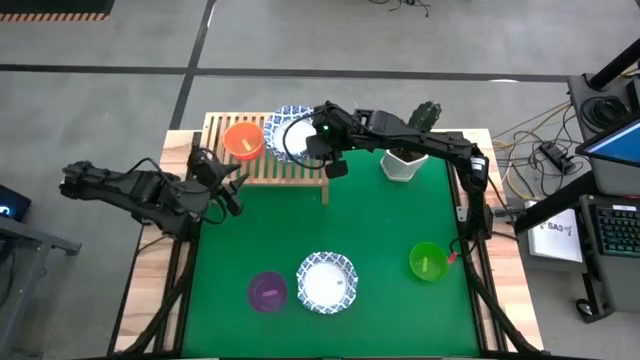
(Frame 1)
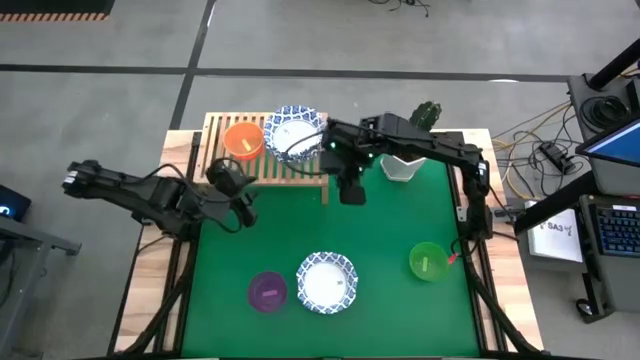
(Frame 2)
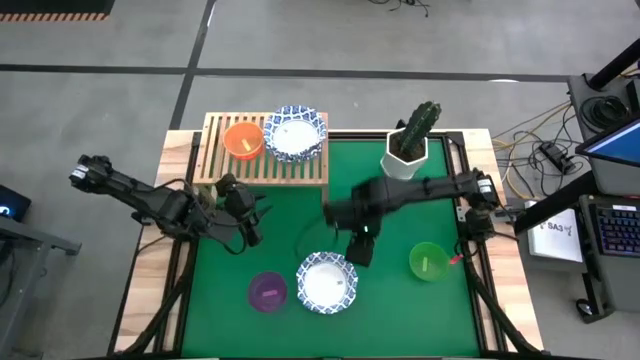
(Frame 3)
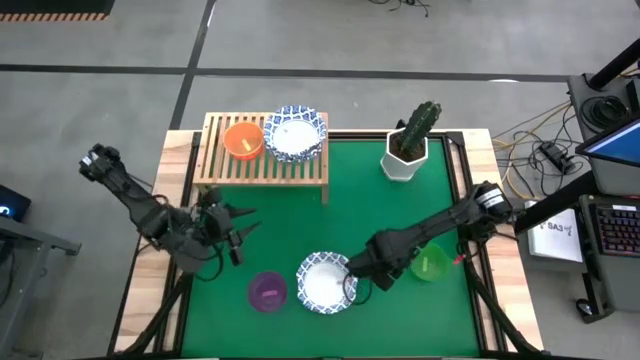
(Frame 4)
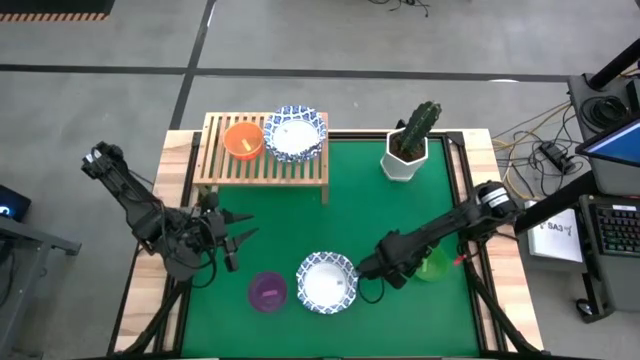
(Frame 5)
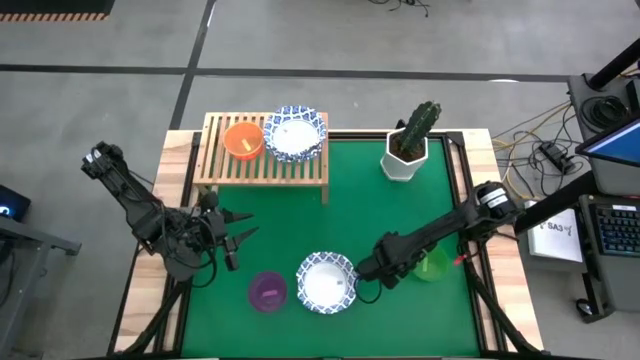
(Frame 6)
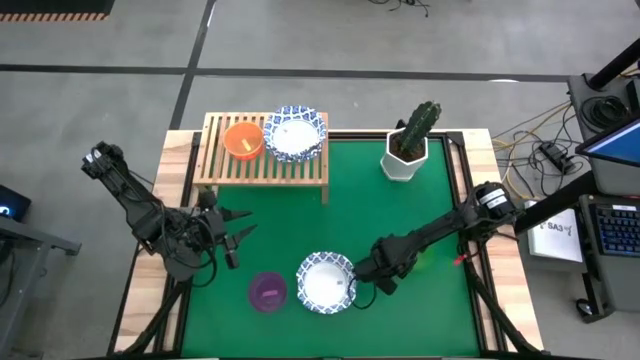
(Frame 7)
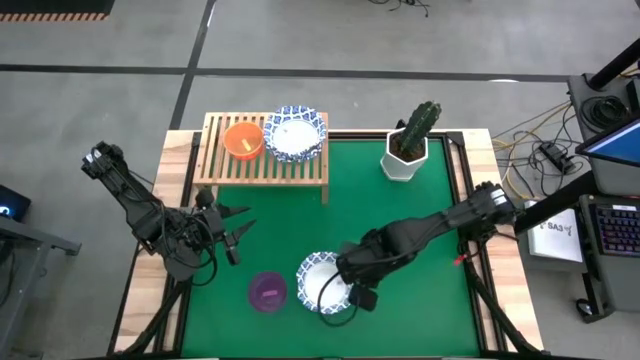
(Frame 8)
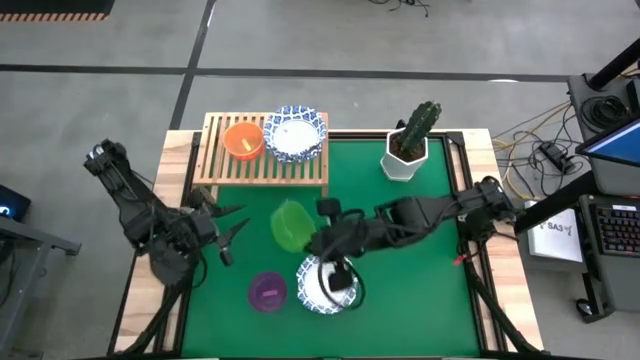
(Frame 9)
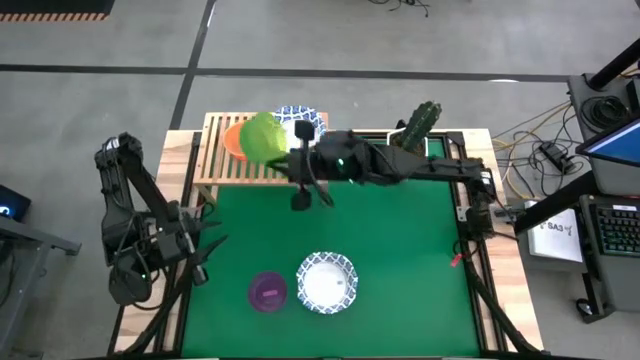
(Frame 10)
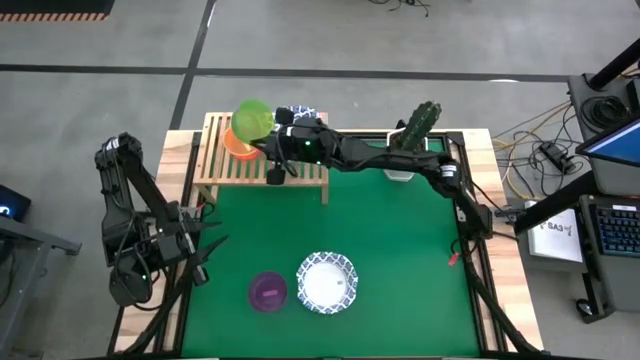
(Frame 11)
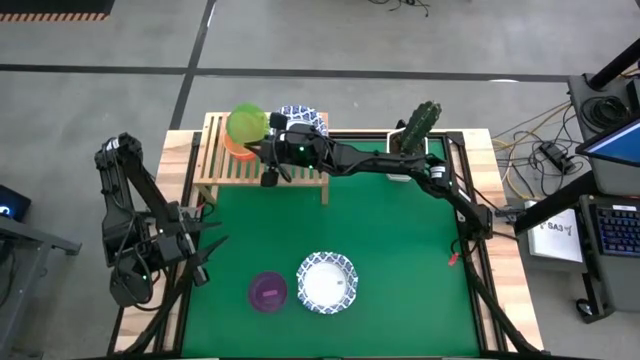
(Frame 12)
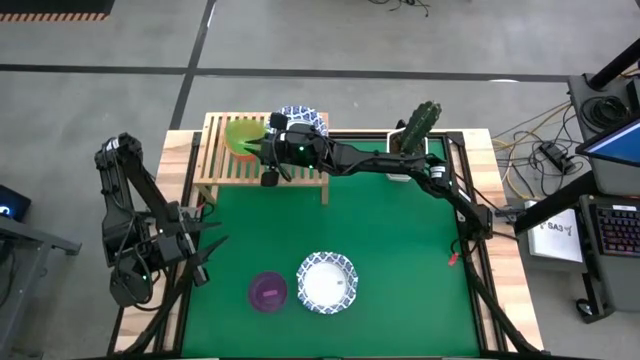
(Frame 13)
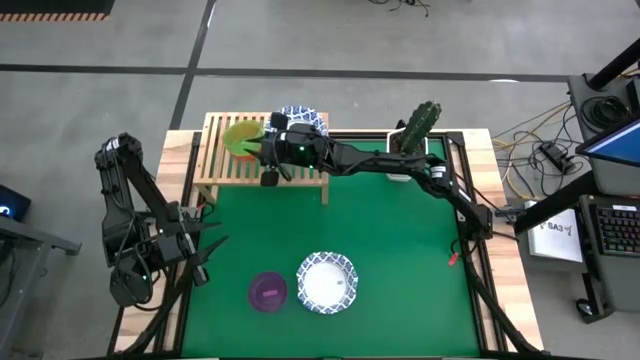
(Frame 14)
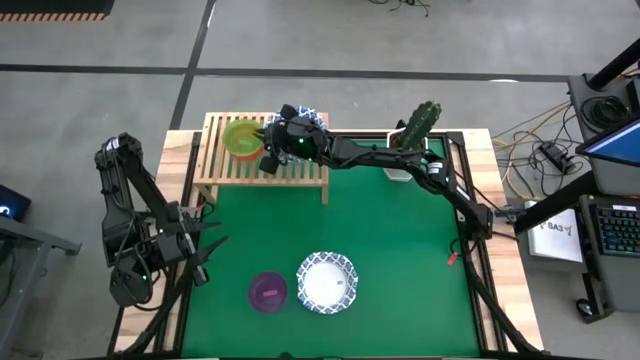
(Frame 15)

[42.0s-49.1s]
Task: Place and stack plates onto a shelf
Stack the green bowl on top of the yellow bowl on the shelf

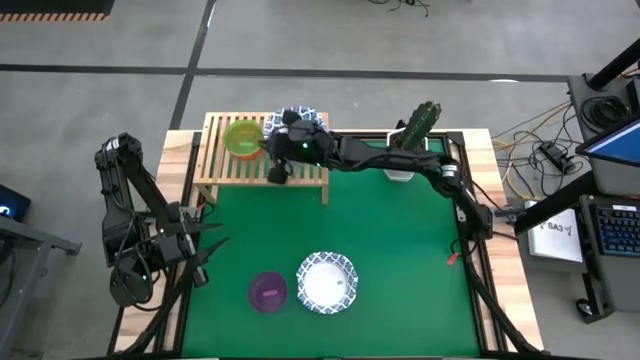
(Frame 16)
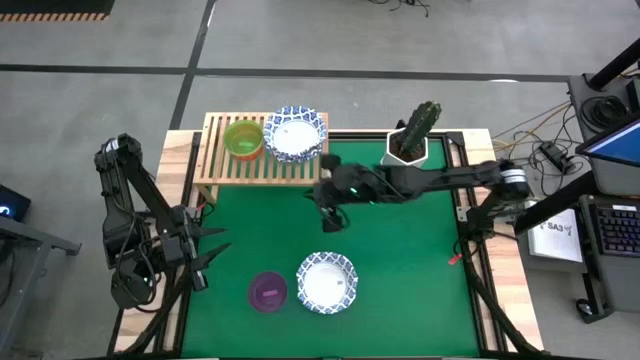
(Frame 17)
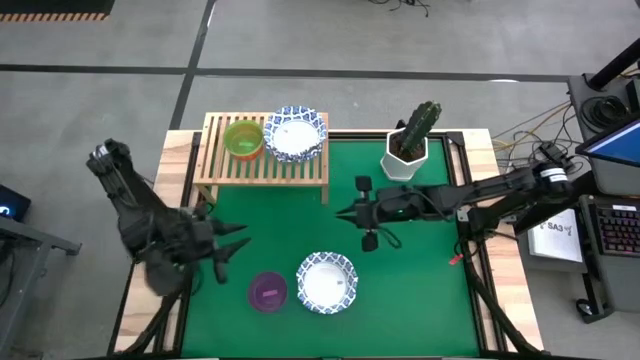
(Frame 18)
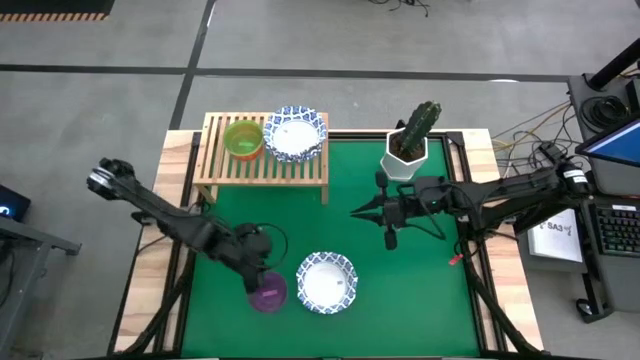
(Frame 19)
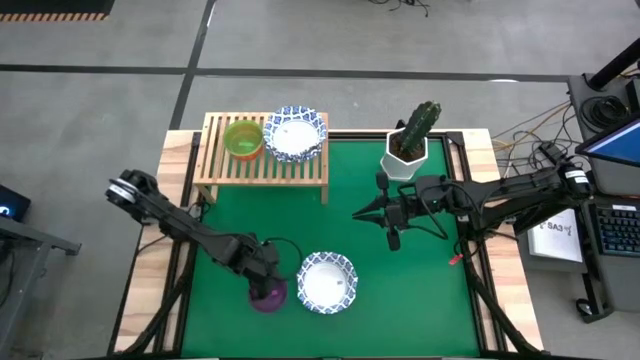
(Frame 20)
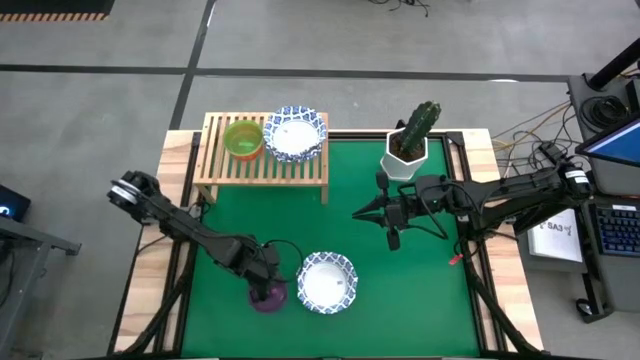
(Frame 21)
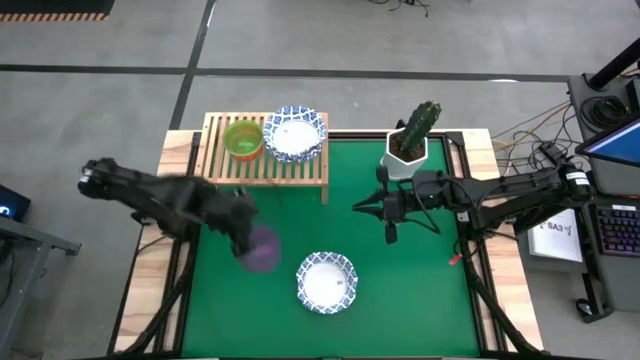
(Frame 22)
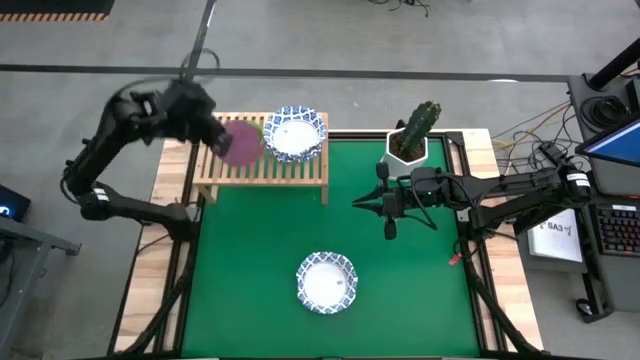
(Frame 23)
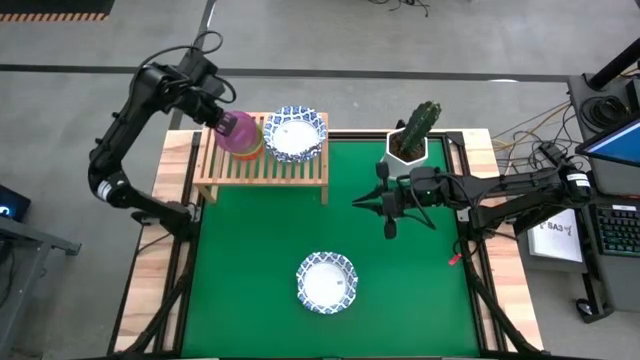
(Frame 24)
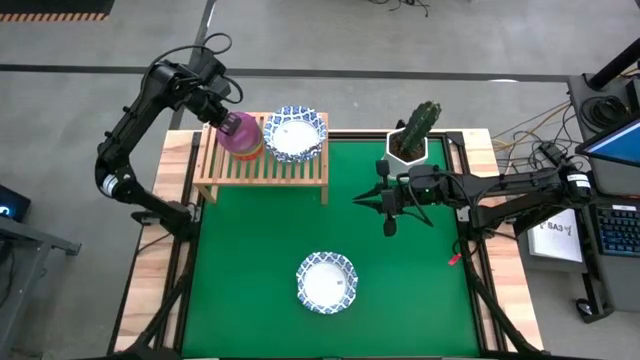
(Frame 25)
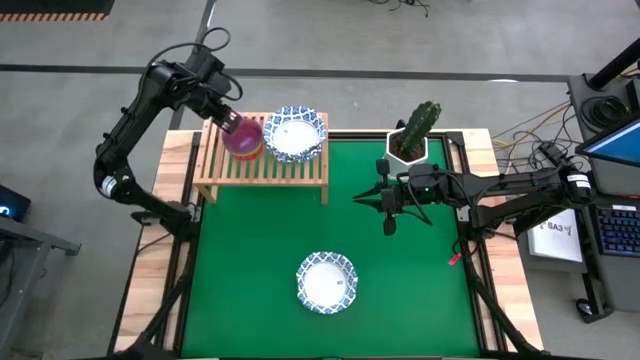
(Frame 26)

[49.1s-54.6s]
Stack the purple bowl on top of the green bowl on the shelf

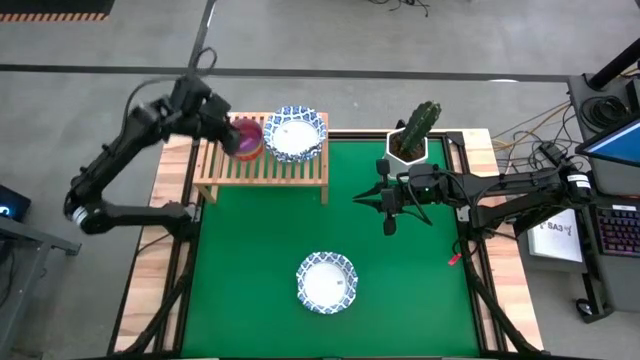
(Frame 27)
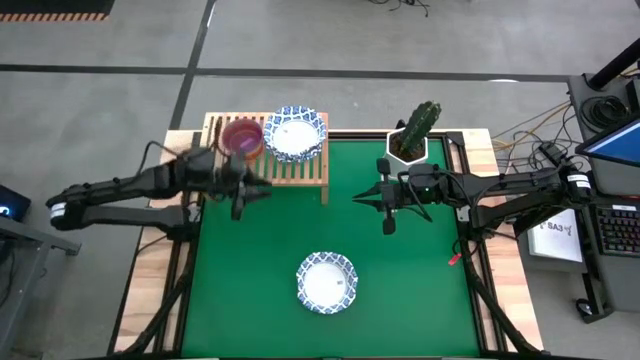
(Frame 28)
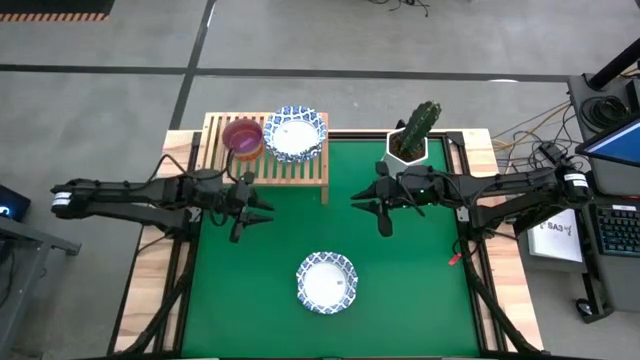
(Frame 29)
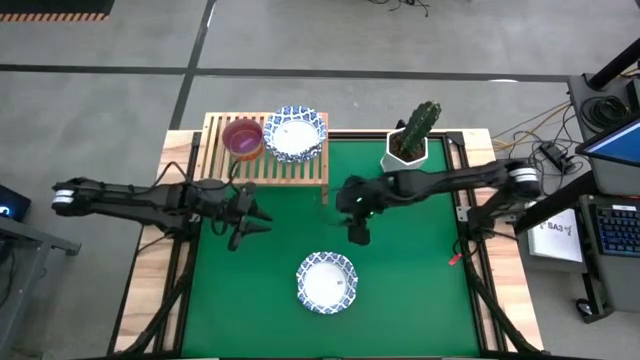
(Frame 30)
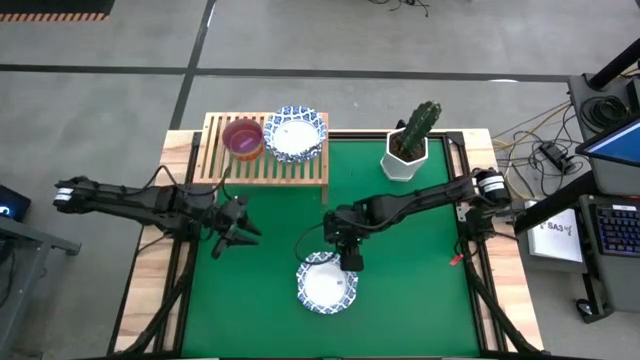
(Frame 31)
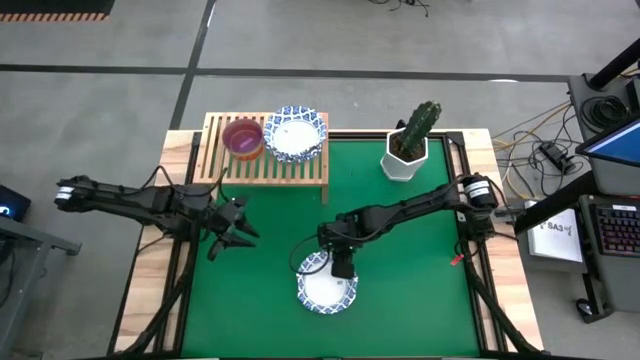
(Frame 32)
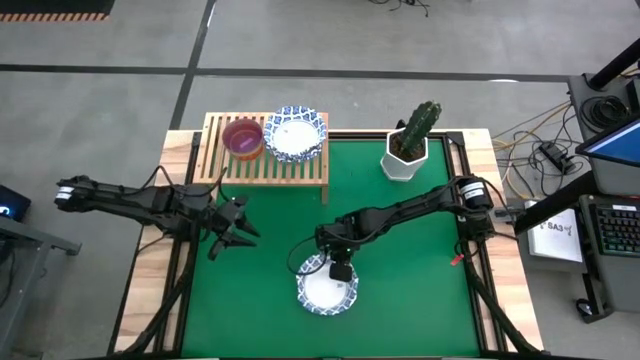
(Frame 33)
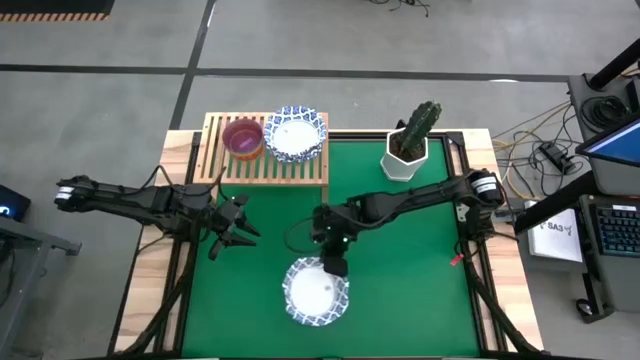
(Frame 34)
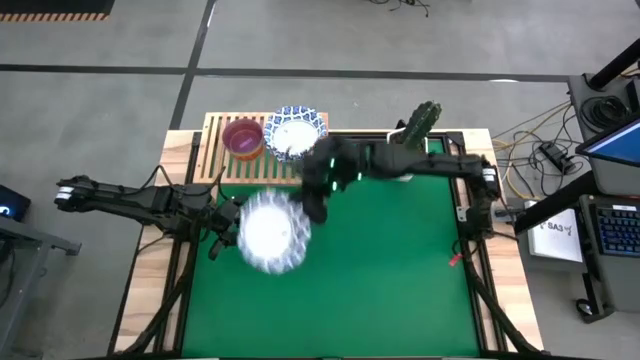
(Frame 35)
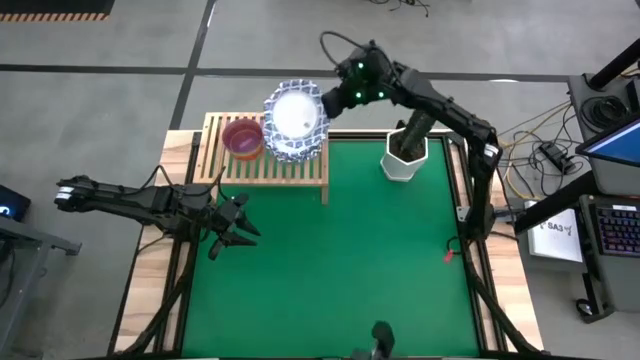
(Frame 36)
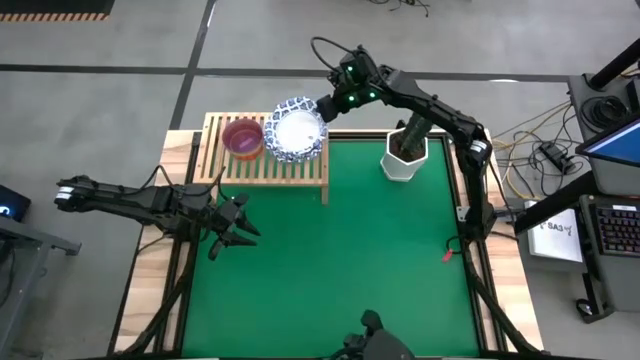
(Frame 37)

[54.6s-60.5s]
Stack the white and blue plate on top of the white and blue plates on the shelf

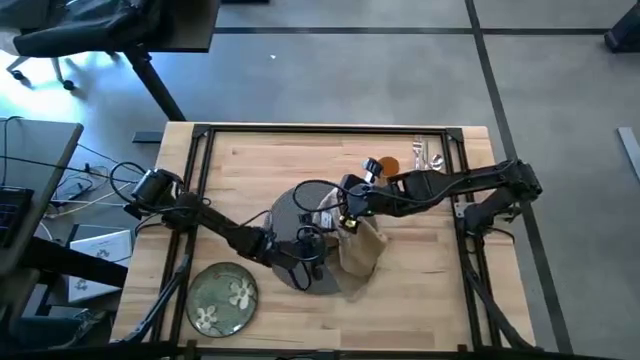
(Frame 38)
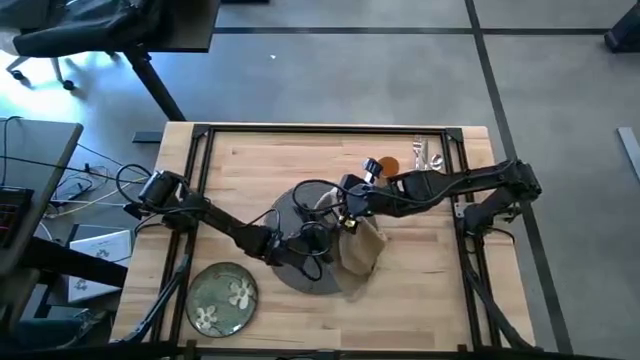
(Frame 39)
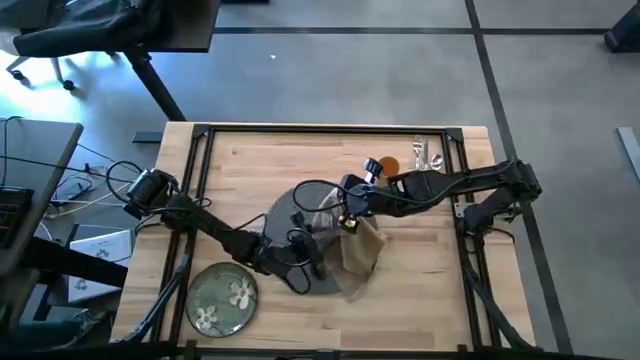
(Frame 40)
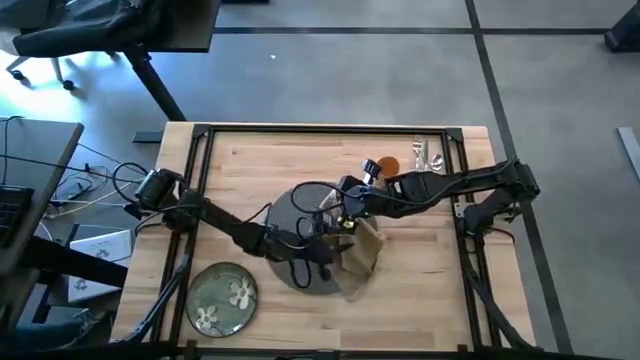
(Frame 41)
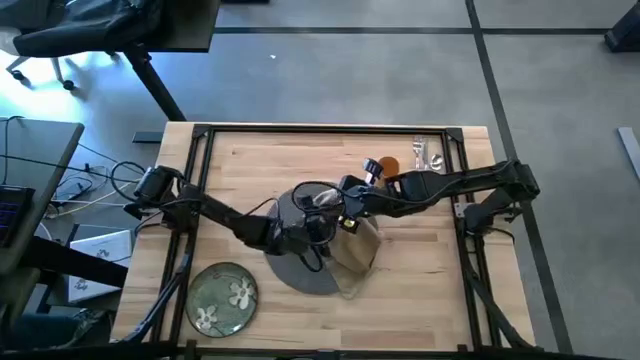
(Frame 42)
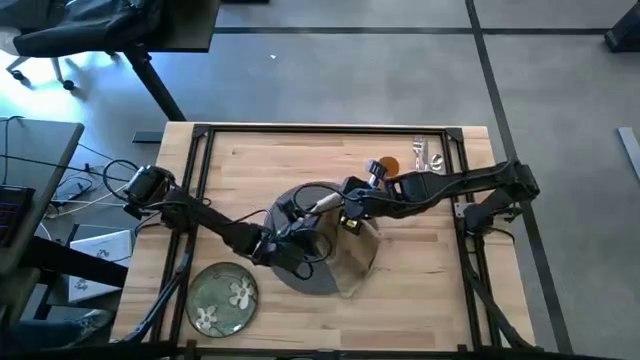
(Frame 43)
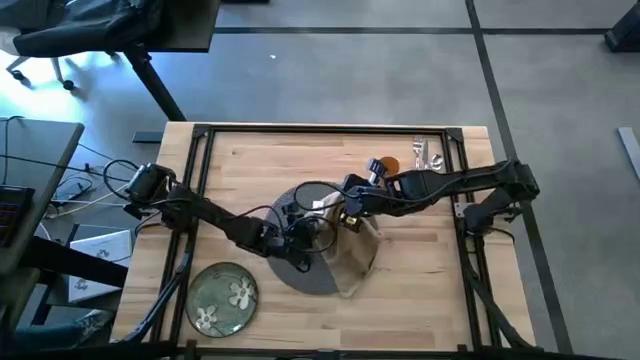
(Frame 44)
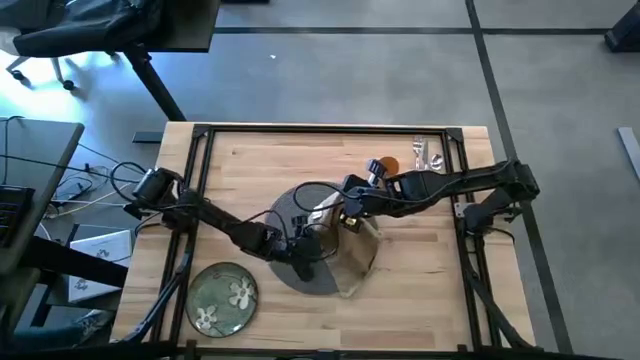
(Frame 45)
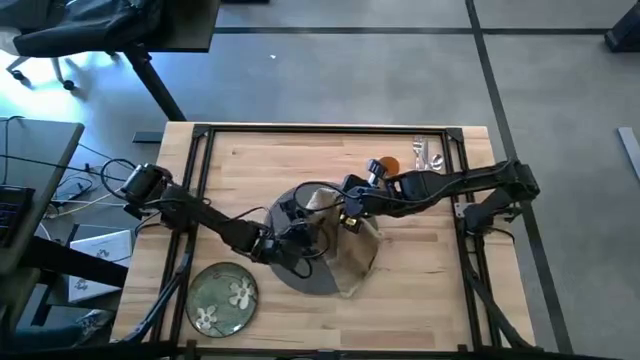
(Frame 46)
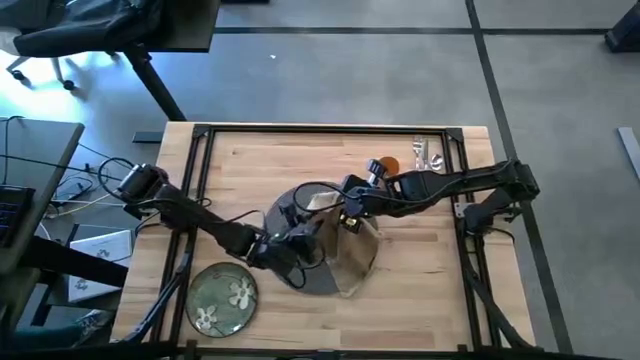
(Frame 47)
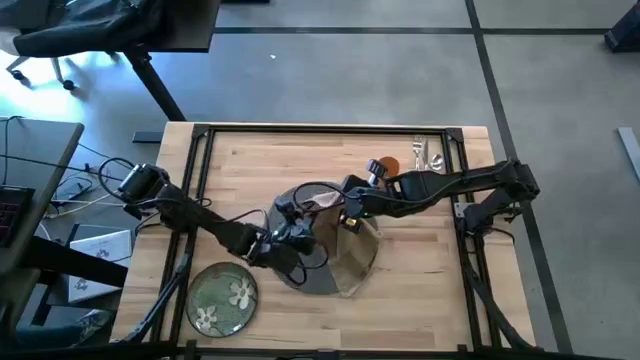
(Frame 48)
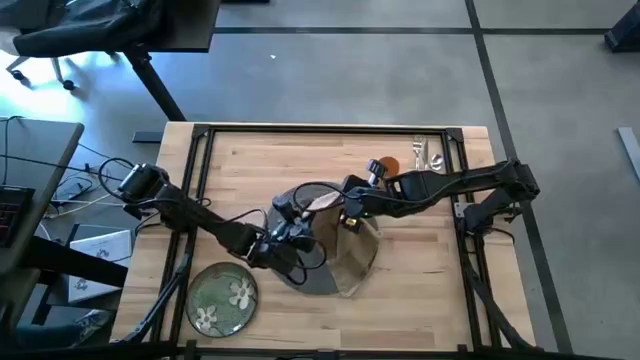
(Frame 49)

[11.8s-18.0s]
Task: Set table place
Fold the brown napkin
